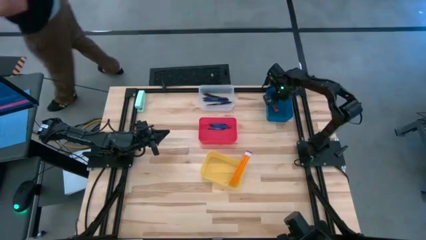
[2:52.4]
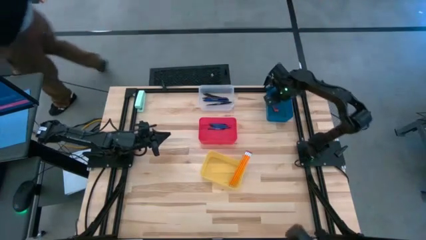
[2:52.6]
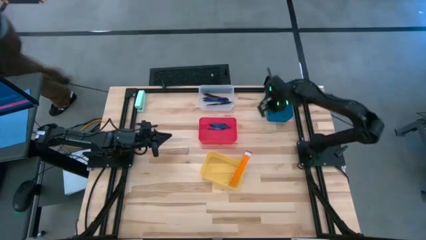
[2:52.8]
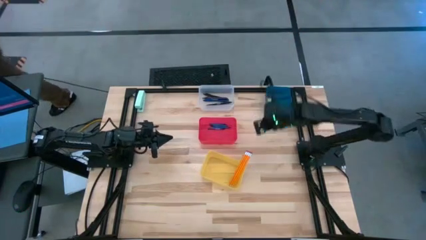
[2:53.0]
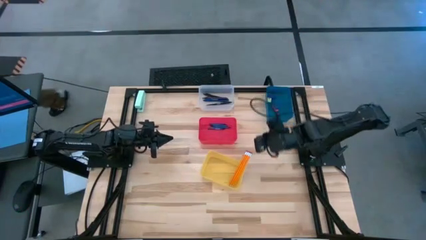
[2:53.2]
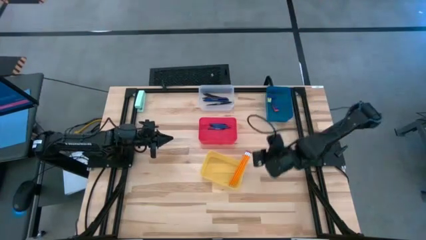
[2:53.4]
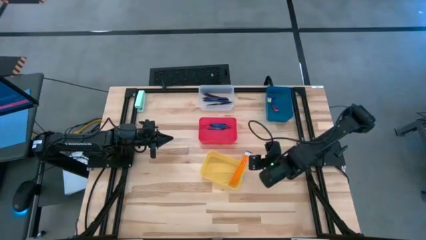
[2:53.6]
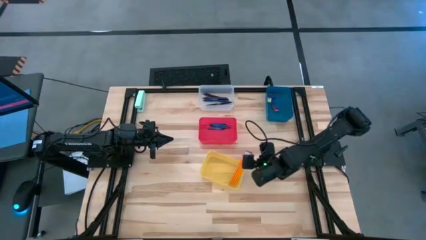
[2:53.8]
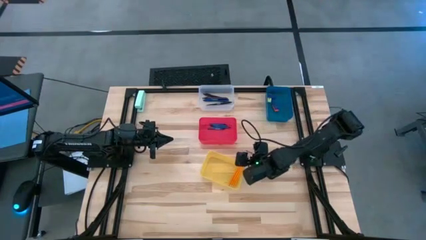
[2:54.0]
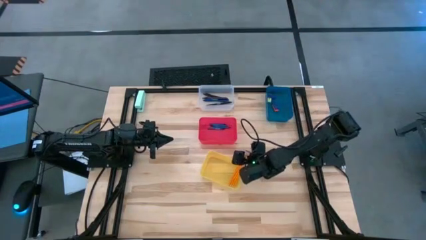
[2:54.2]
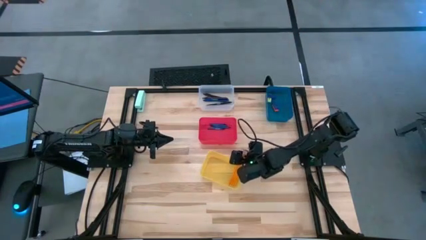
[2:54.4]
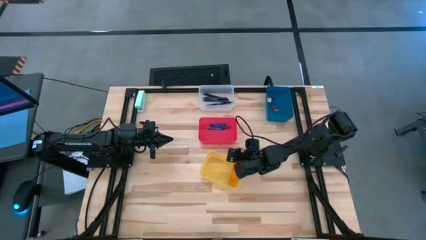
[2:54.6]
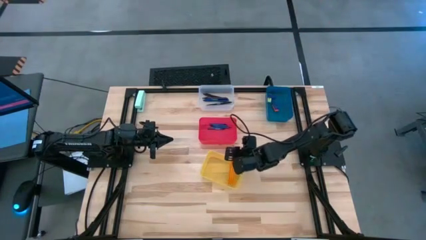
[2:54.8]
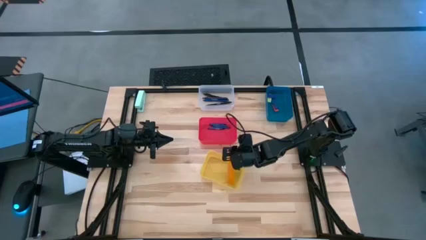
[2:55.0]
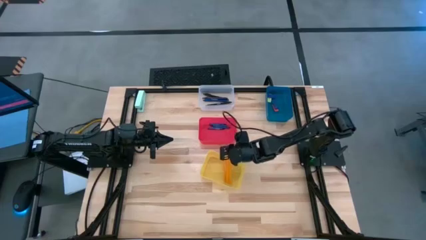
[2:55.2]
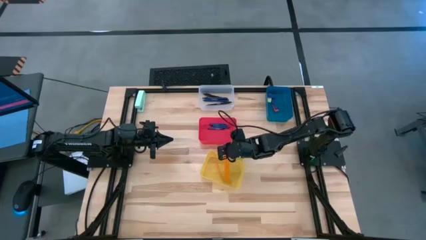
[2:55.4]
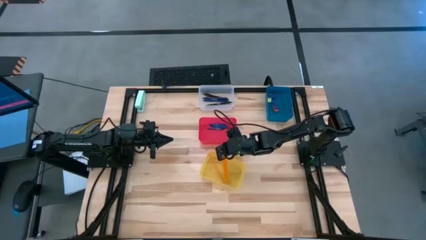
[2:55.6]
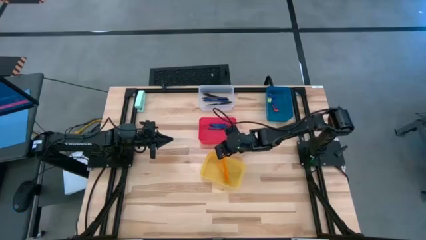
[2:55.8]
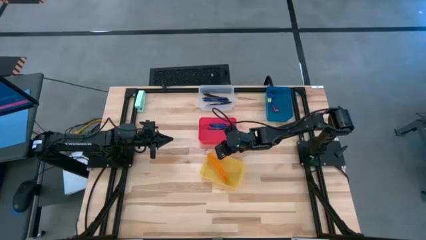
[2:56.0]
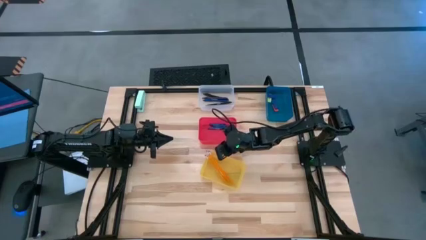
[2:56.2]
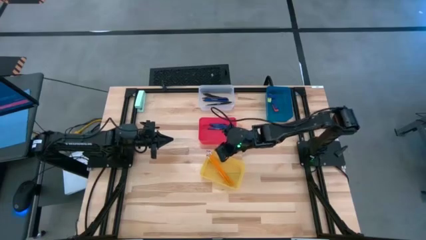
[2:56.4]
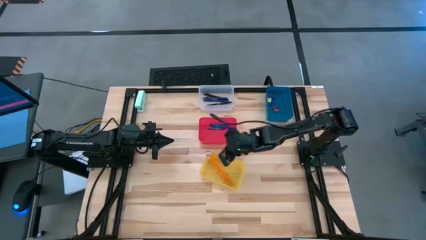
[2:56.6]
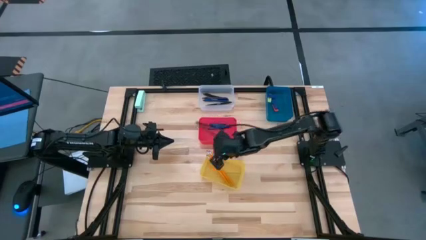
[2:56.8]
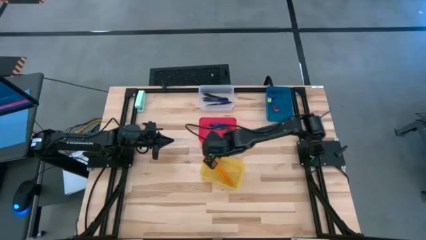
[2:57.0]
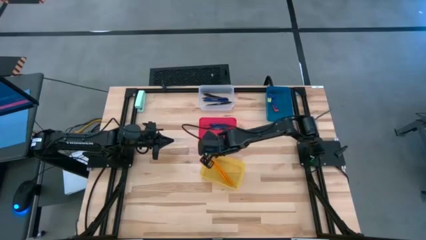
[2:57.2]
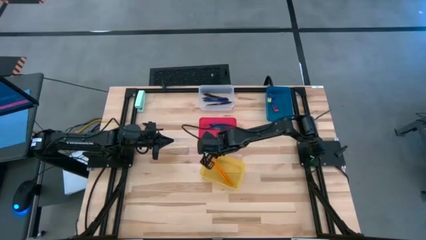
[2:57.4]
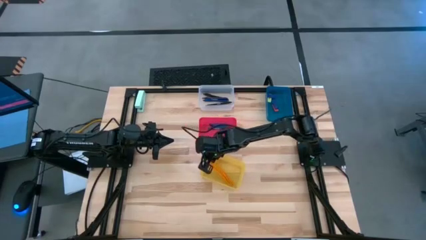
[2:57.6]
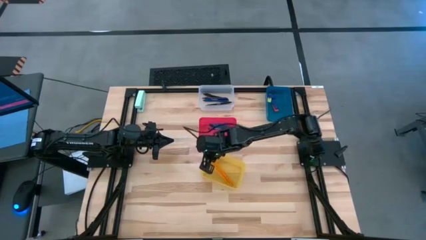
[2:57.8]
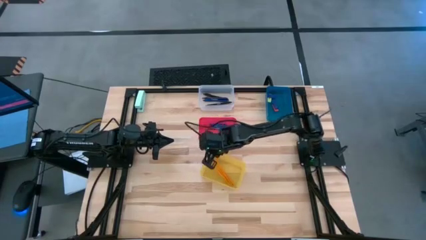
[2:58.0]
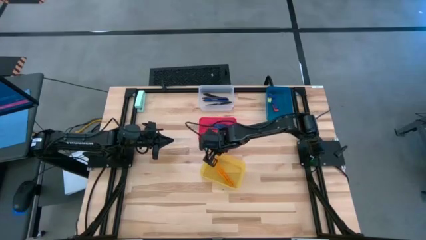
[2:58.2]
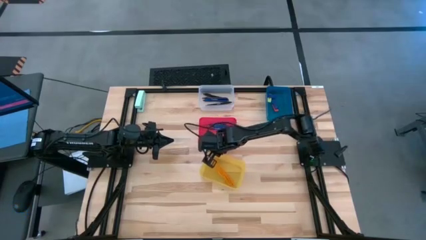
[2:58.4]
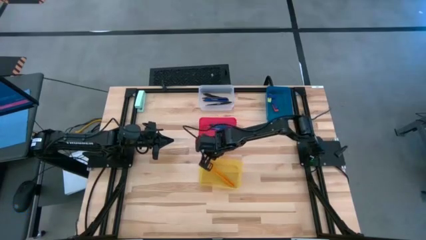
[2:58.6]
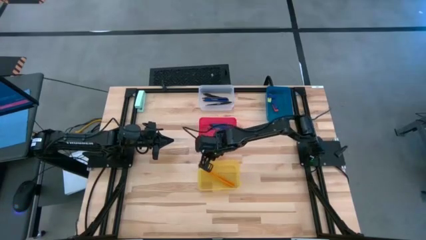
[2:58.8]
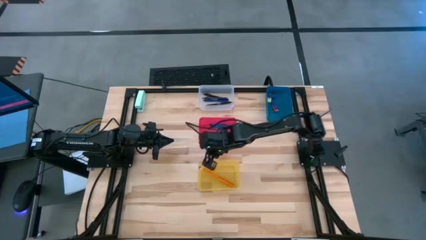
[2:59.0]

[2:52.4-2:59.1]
Task: Sort crayons/erasers/pens/pencils in bins
Adjust the orange pencils in the yellow bin

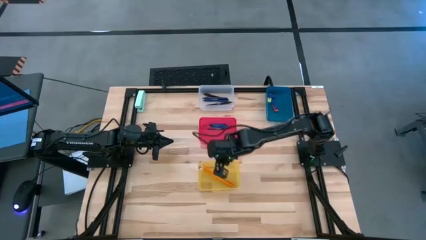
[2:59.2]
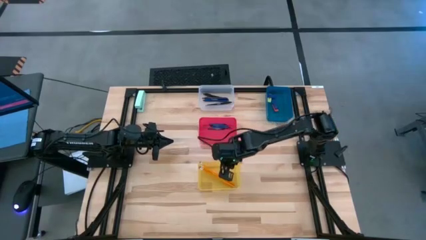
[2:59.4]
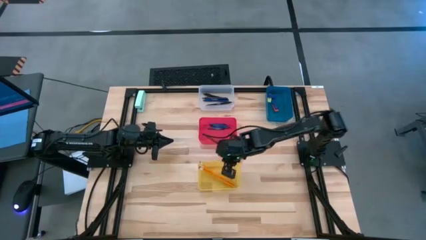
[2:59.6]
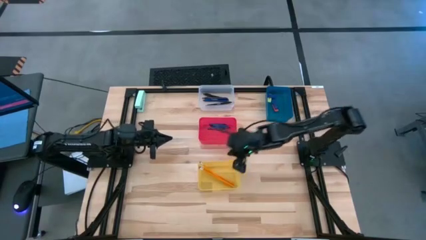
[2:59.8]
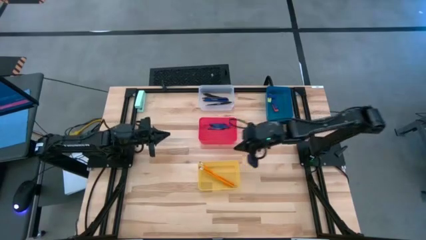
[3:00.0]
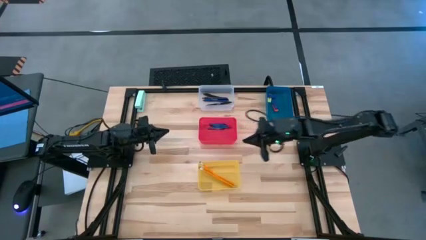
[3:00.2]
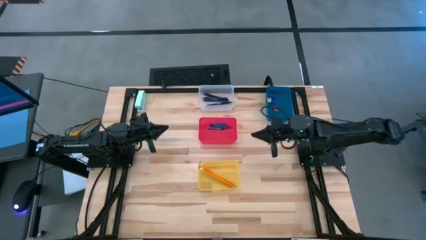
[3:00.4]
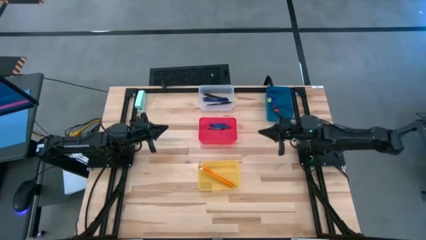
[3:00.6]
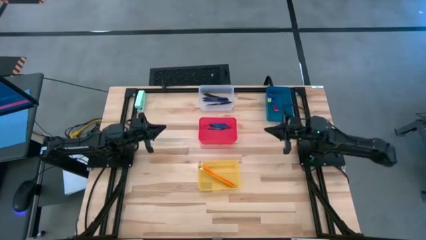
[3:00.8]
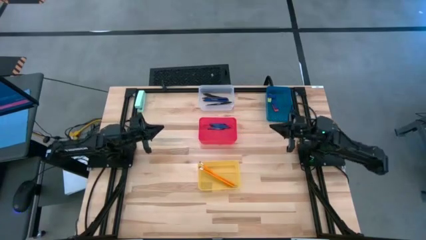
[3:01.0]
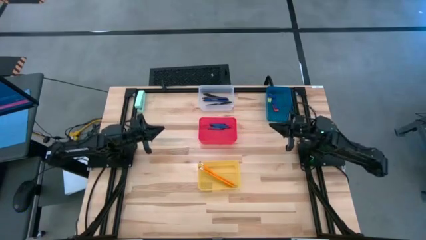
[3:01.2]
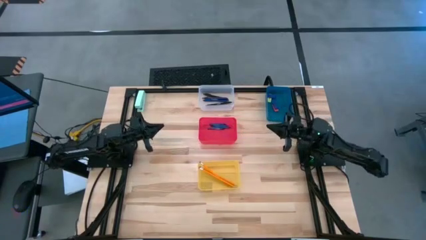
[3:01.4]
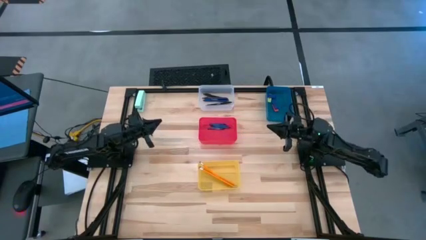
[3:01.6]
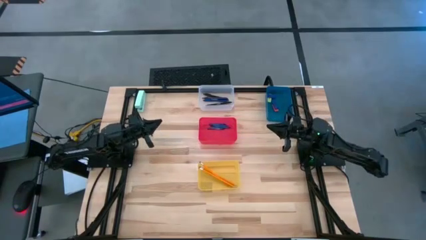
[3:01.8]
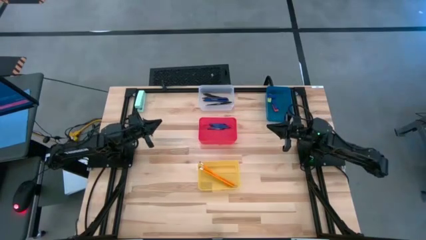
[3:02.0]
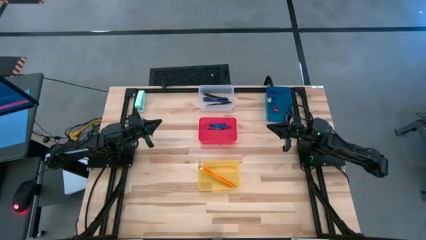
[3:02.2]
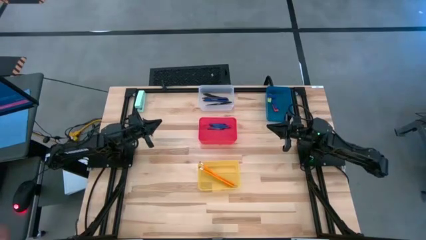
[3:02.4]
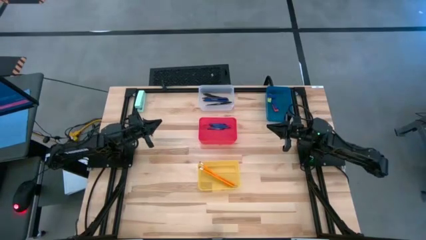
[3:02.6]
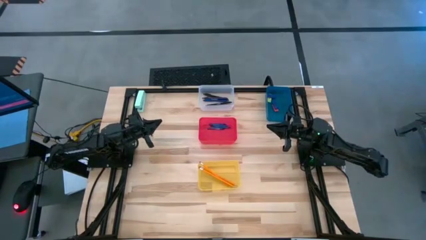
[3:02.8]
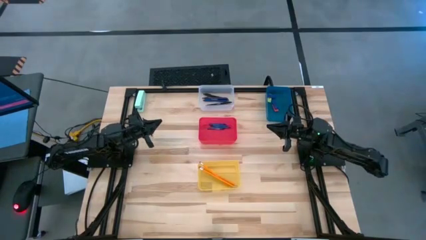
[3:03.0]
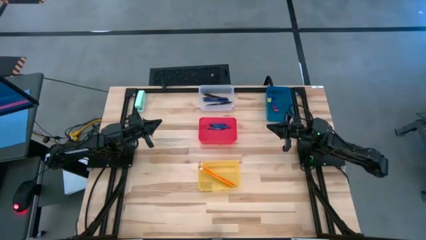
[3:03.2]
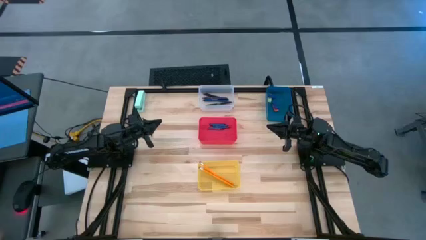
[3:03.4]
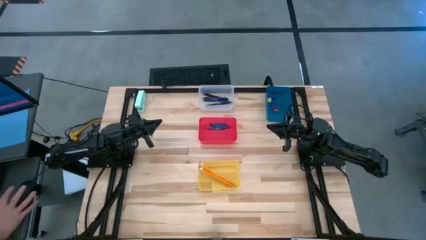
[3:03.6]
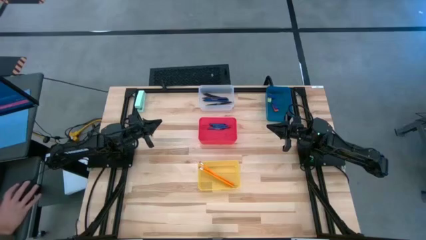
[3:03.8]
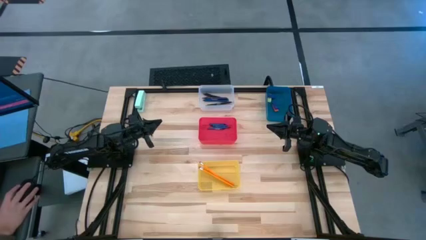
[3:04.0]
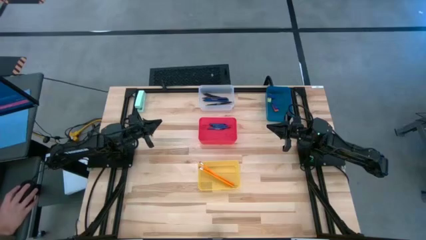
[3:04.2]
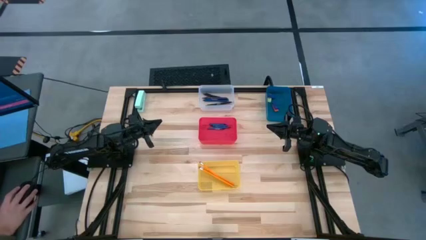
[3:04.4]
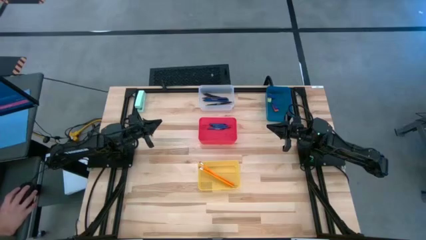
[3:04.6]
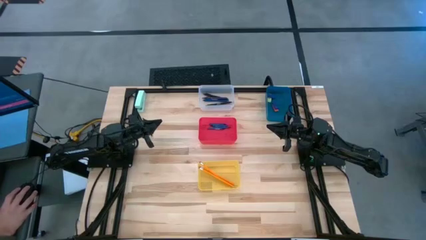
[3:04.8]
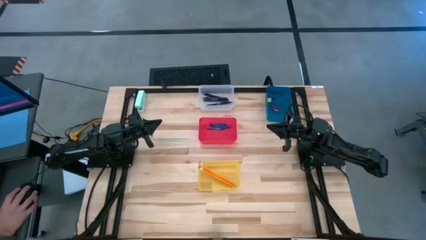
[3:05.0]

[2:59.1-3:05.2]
Return to Home Position

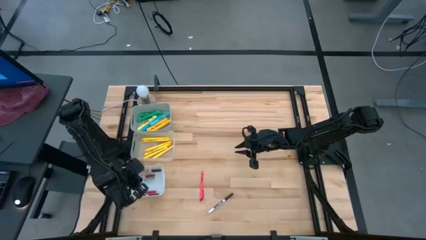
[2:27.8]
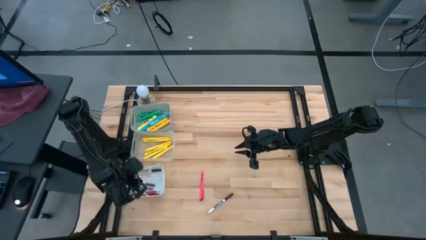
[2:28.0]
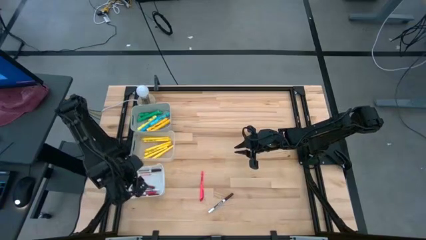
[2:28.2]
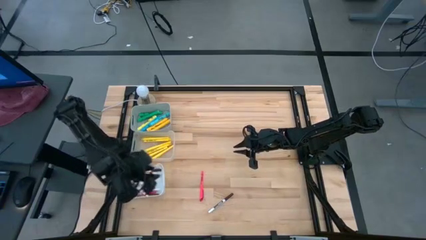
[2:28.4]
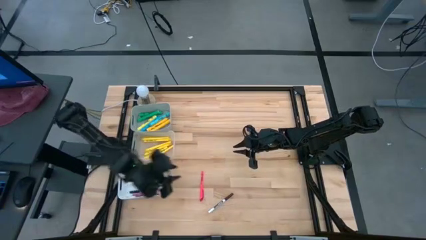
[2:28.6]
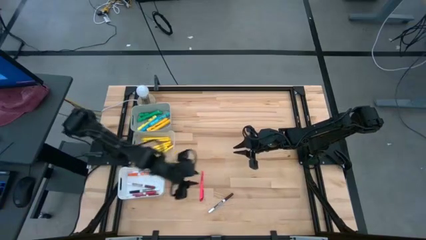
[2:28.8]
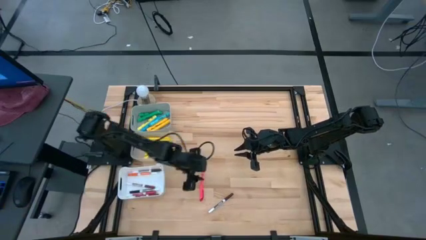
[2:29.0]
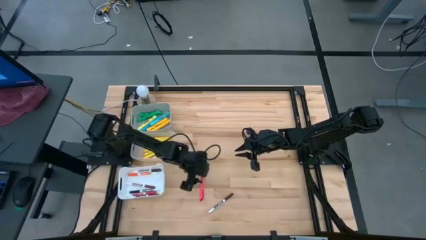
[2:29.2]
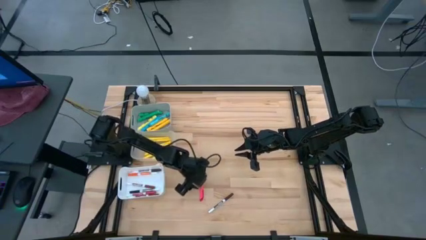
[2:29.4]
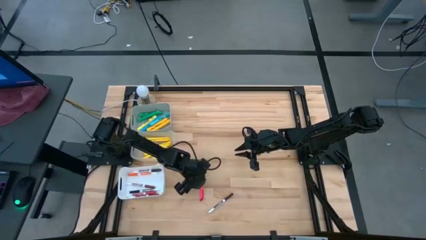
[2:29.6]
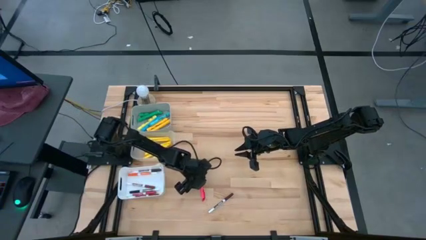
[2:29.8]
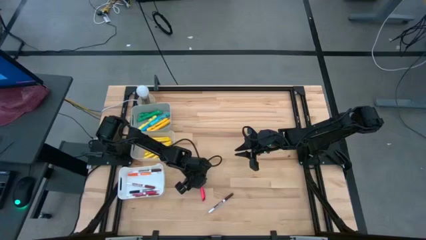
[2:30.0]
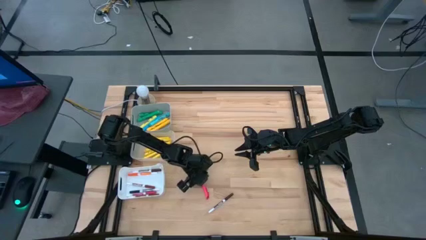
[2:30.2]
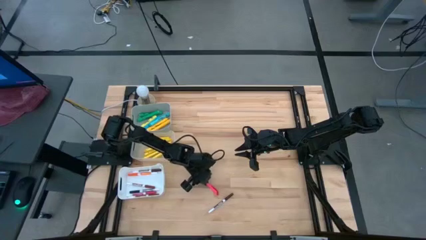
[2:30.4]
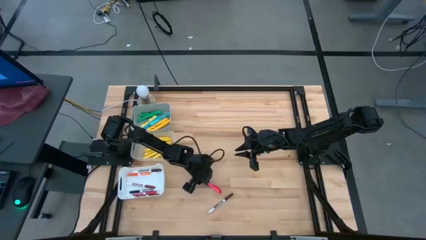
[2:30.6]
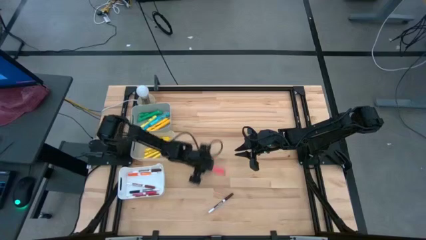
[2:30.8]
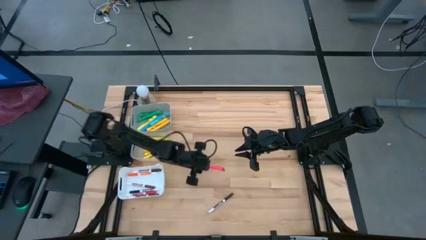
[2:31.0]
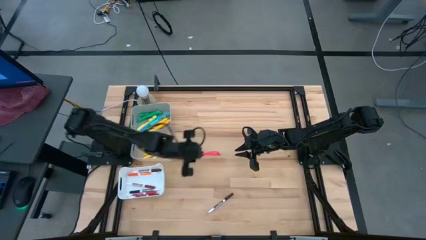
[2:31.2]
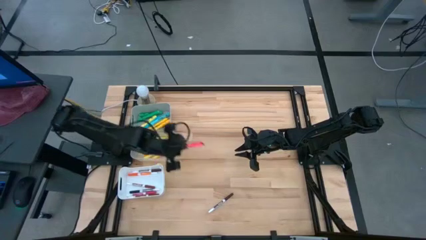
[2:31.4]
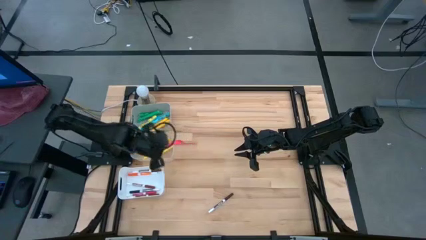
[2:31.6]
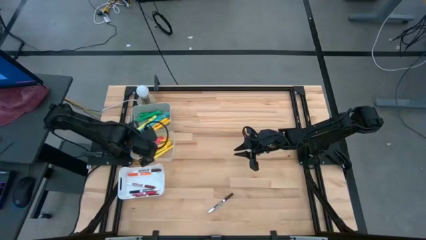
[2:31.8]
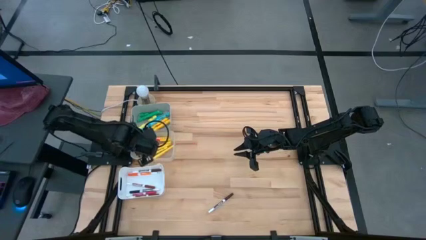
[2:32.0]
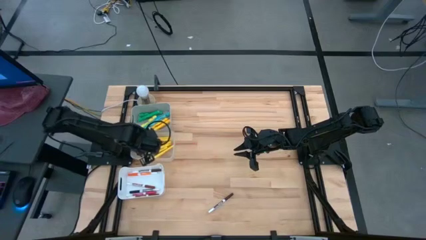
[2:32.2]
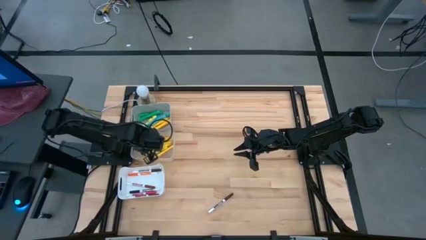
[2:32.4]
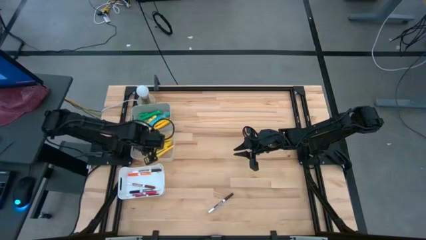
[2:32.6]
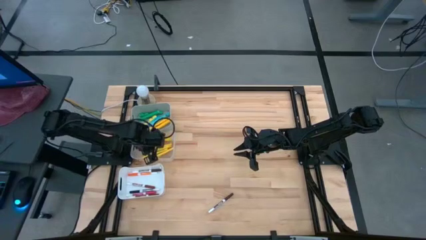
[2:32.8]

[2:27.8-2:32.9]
Task: Pick & Place Markers
Put the pink pen into the transparent bin
